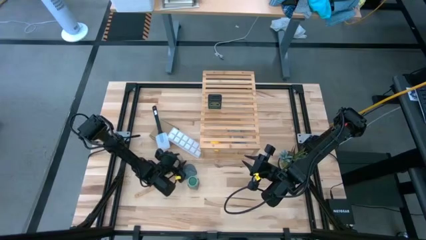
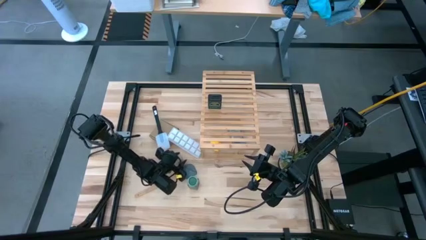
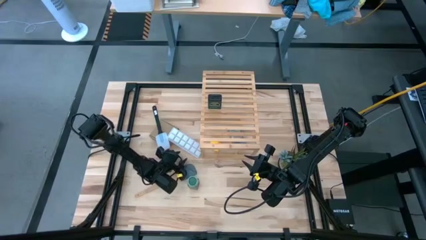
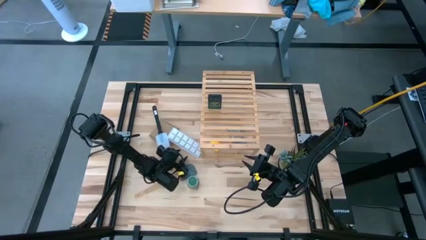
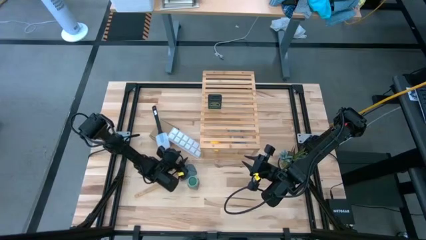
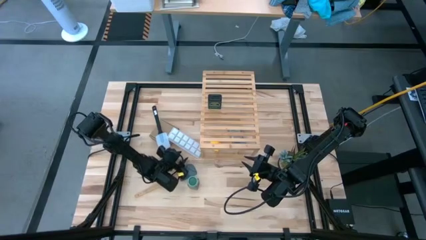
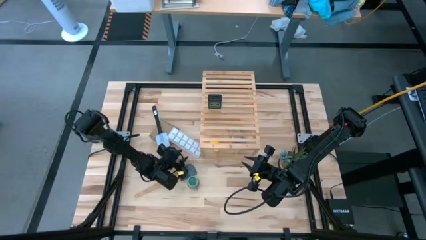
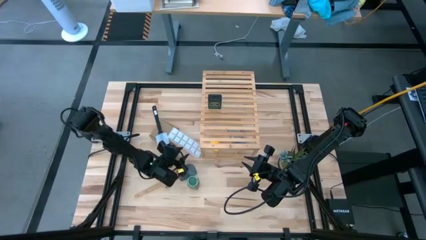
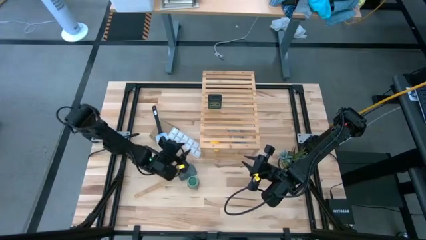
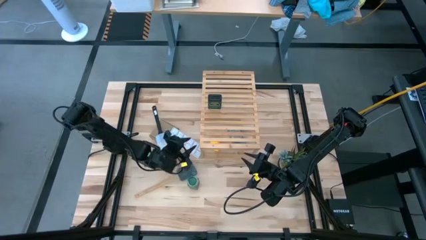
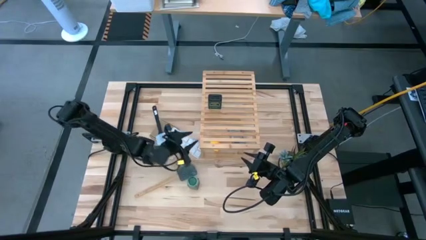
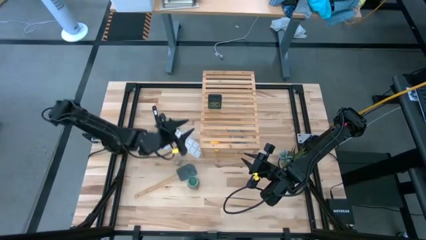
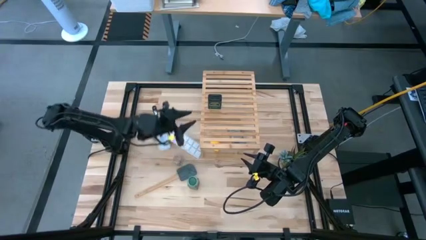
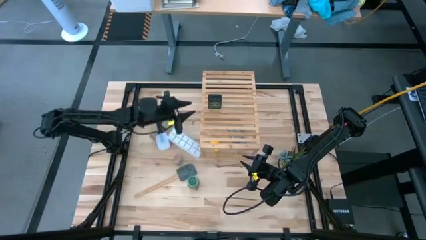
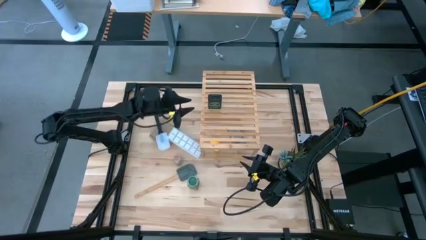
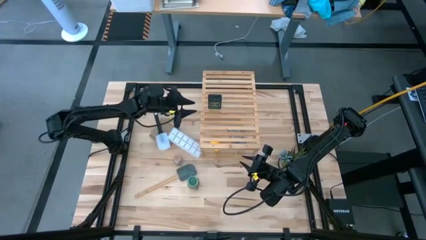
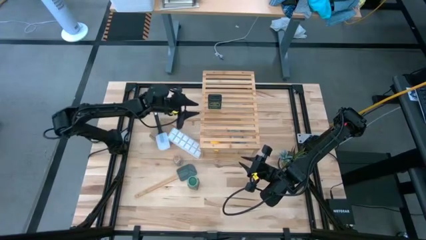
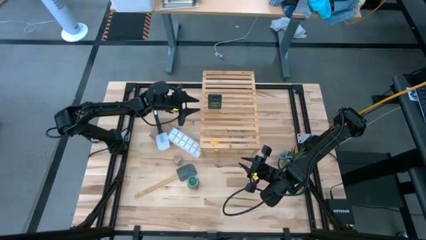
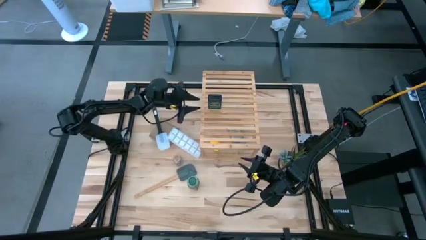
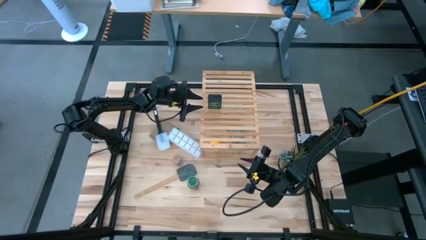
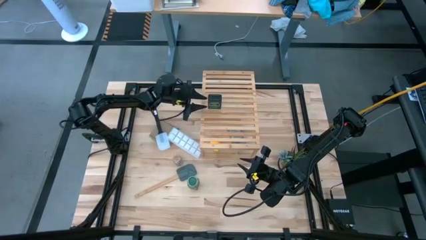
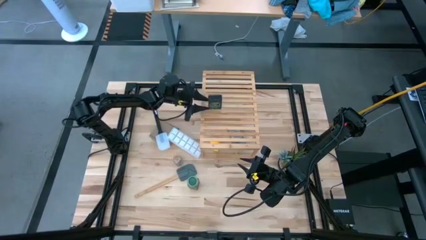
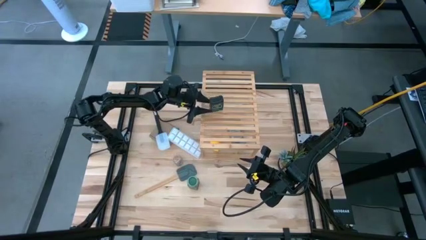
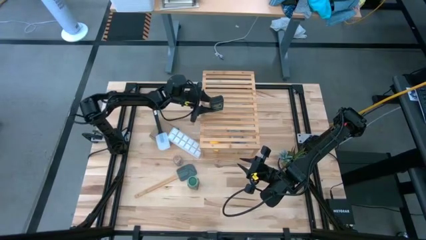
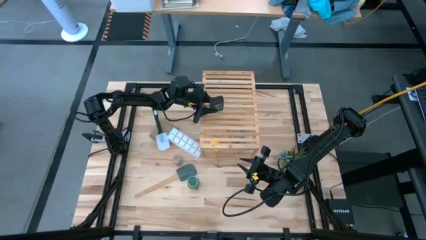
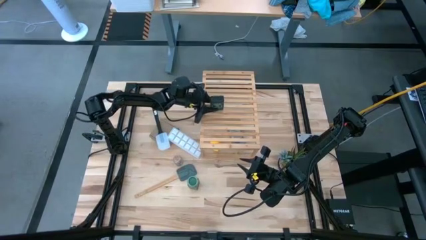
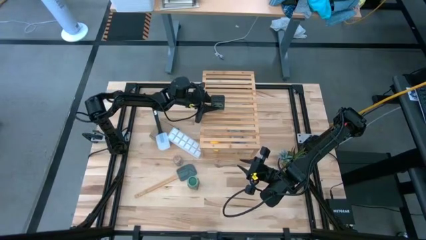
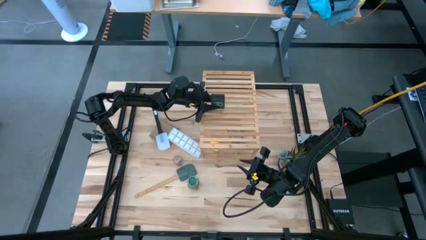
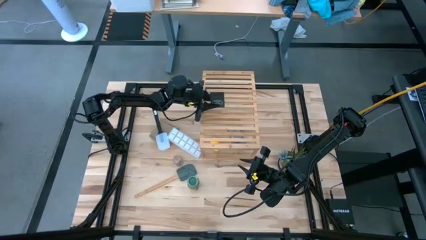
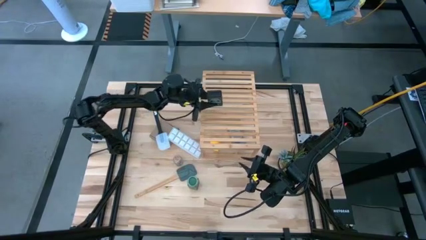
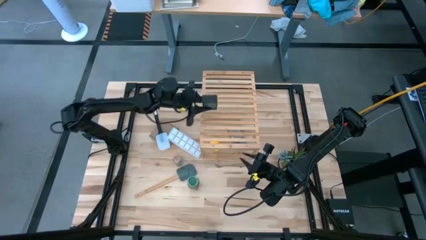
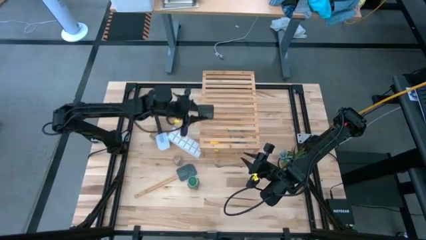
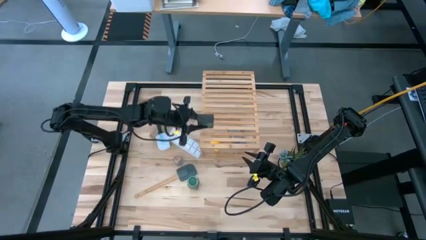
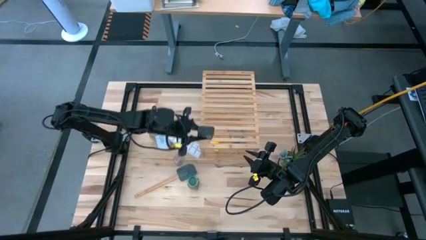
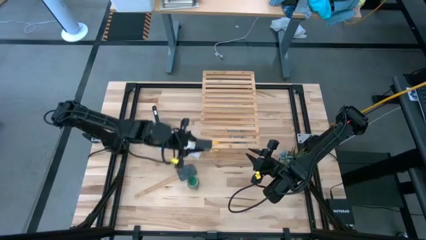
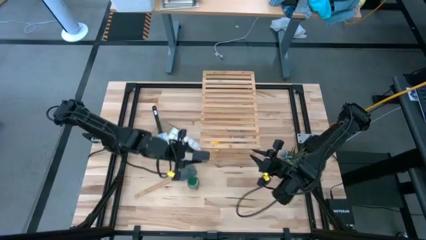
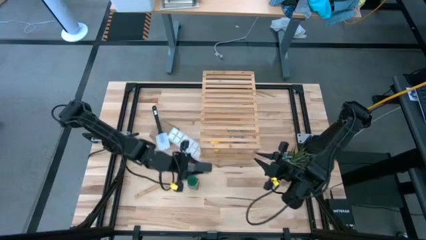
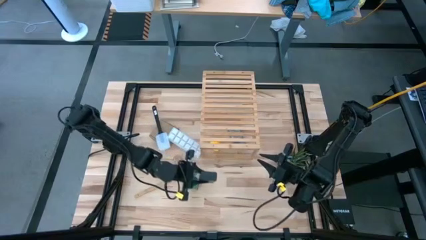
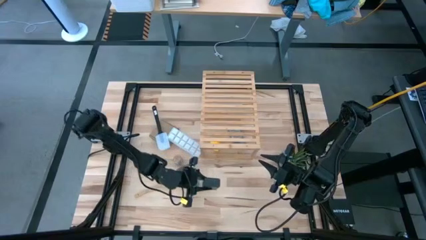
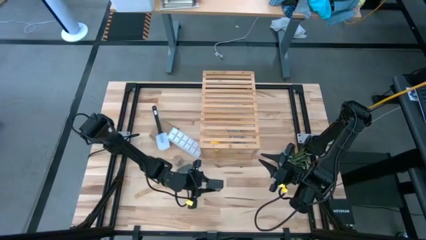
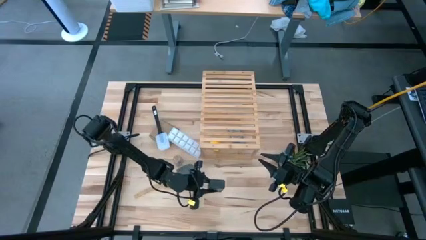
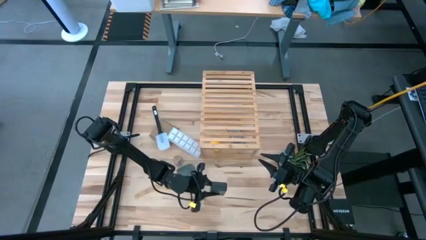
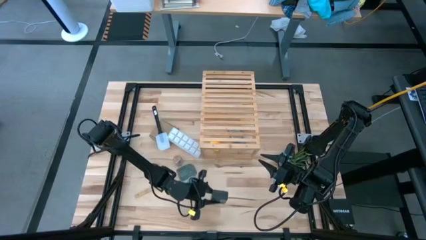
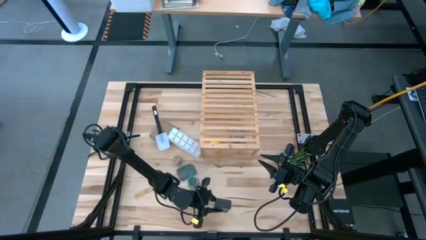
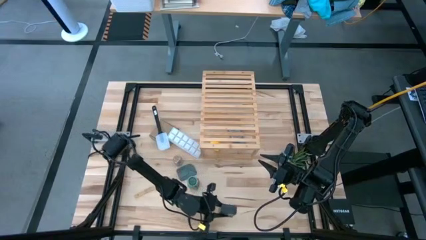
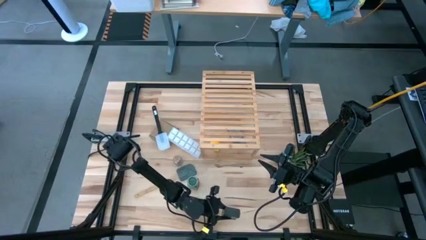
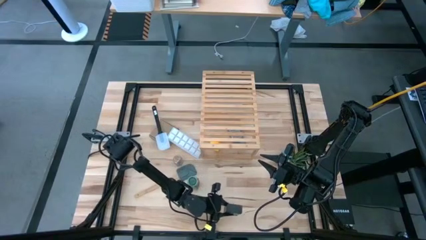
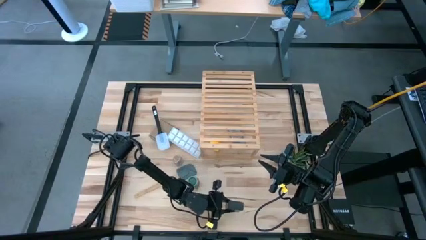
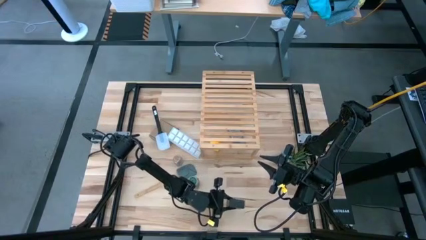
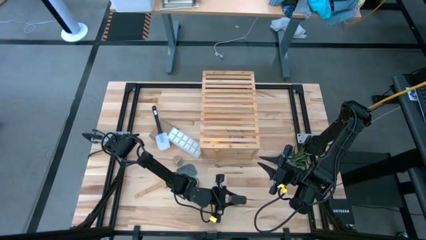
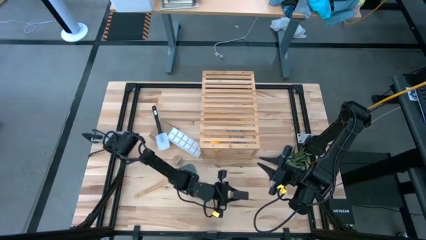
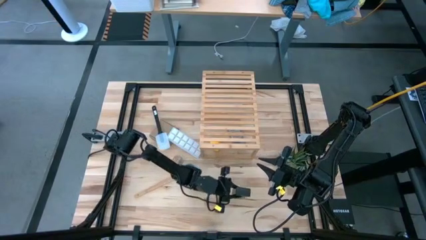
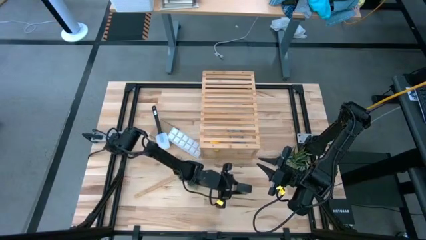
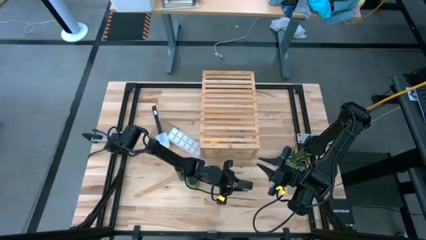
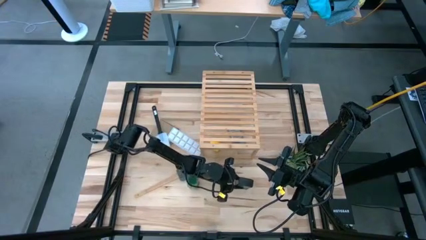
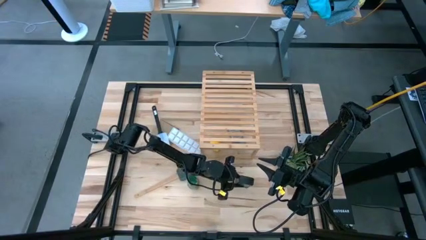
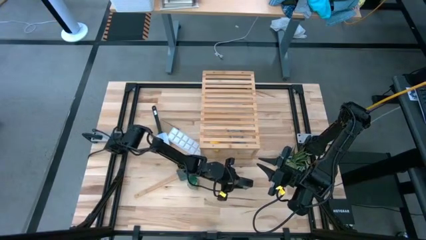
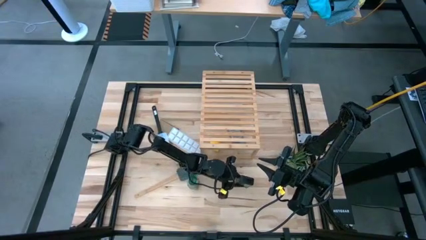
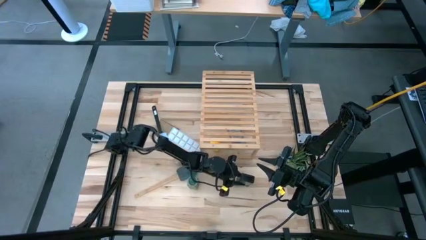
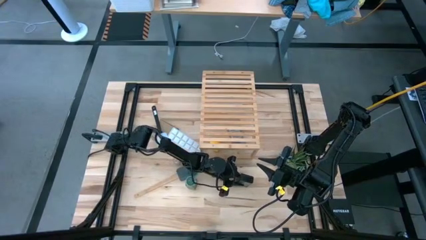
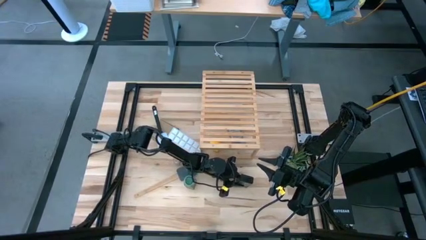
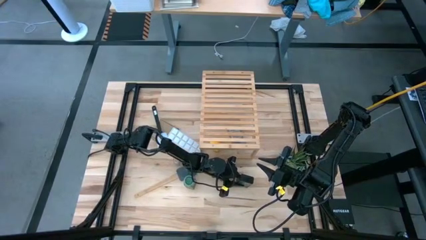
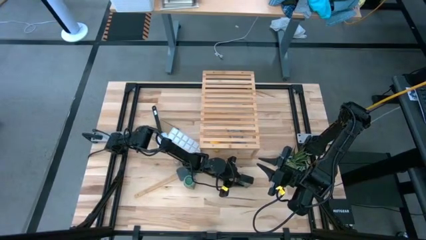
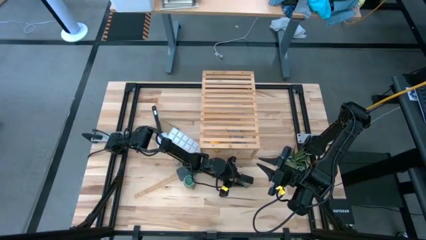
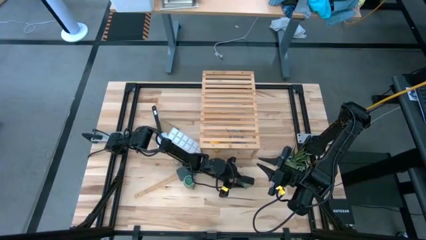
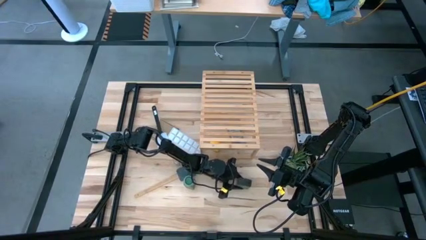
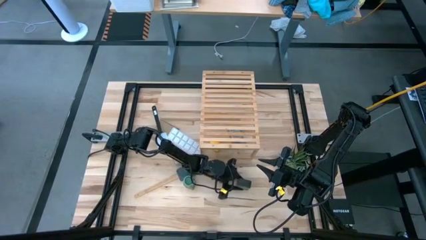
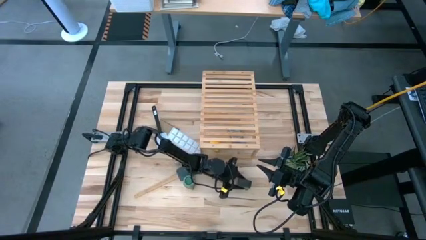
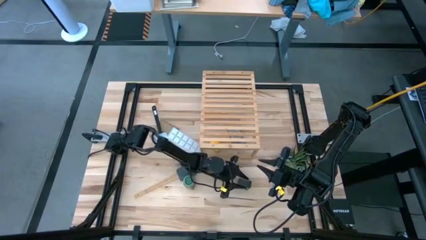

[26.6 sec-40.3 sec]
Task: Shelf spices
Remove the black seasoning can from the shelf
